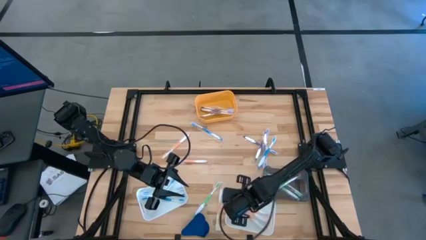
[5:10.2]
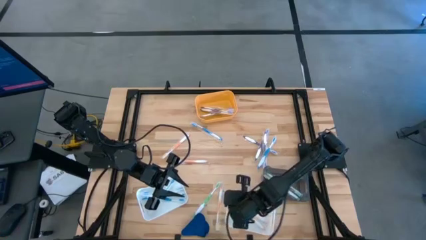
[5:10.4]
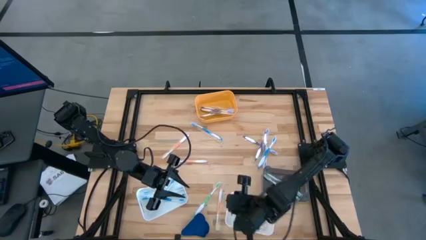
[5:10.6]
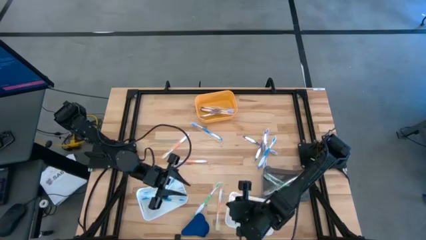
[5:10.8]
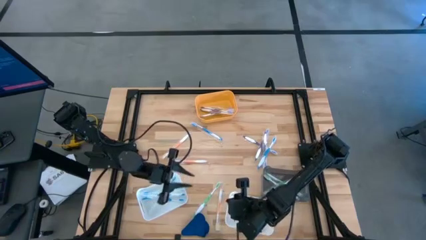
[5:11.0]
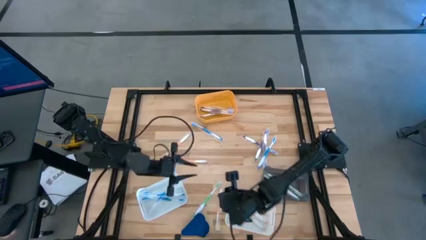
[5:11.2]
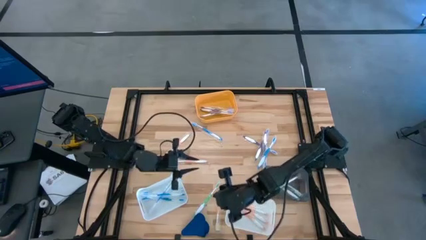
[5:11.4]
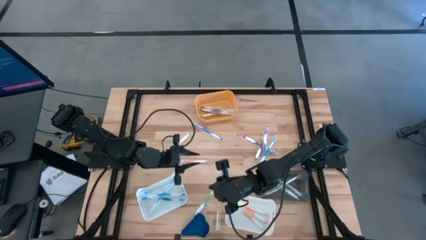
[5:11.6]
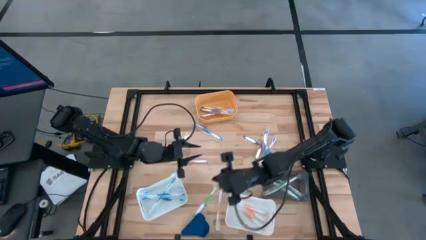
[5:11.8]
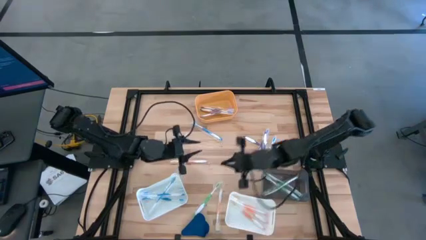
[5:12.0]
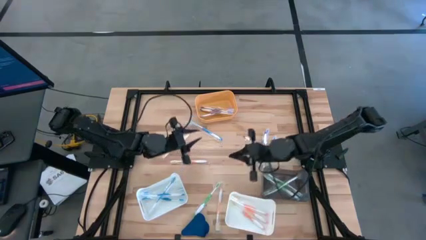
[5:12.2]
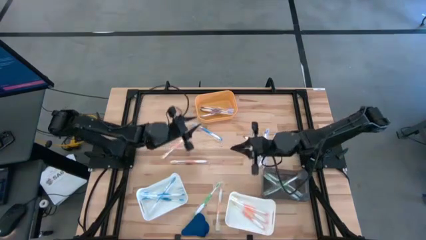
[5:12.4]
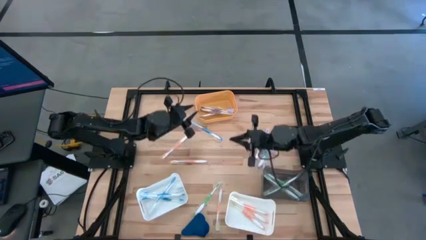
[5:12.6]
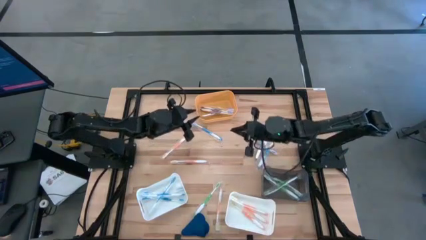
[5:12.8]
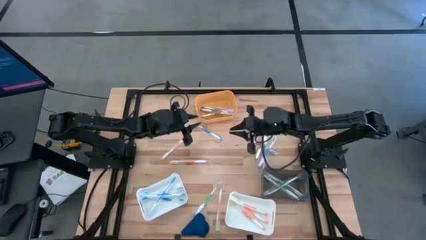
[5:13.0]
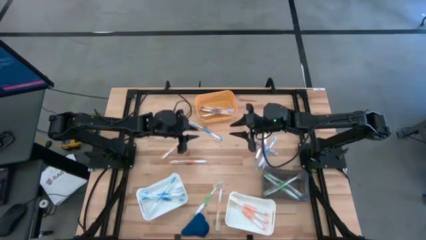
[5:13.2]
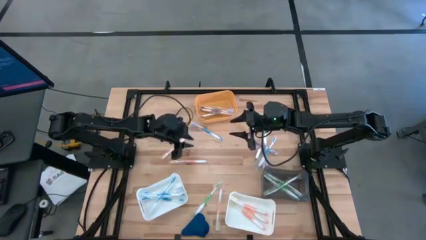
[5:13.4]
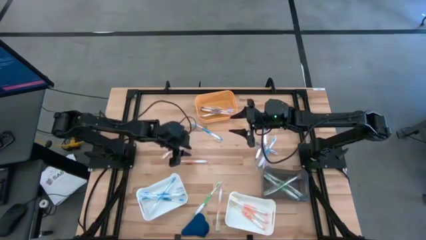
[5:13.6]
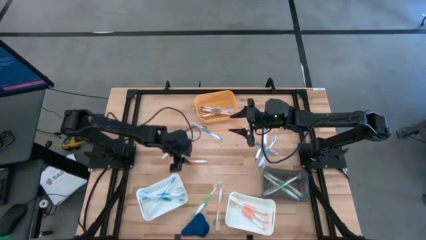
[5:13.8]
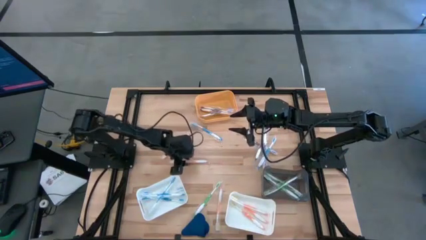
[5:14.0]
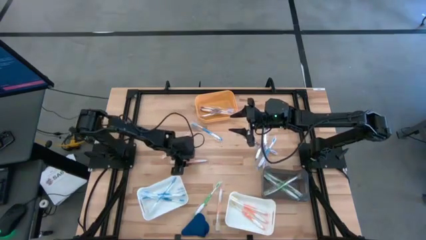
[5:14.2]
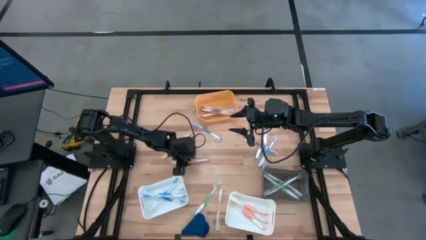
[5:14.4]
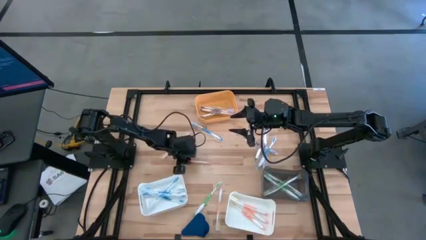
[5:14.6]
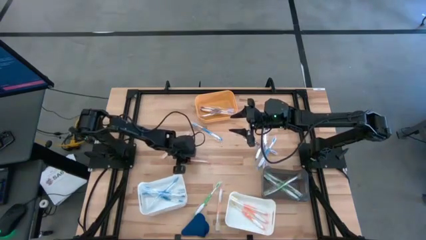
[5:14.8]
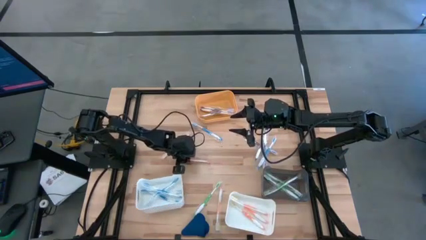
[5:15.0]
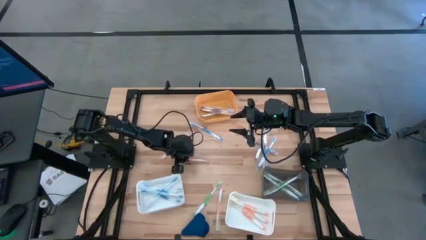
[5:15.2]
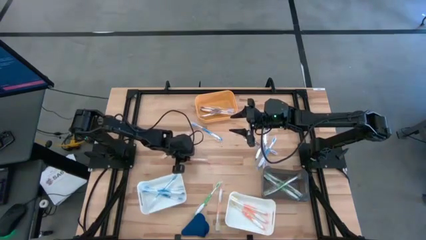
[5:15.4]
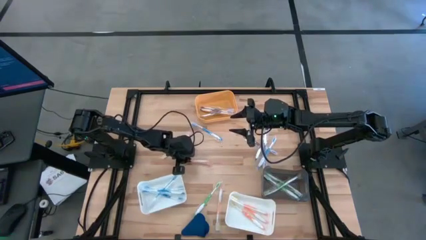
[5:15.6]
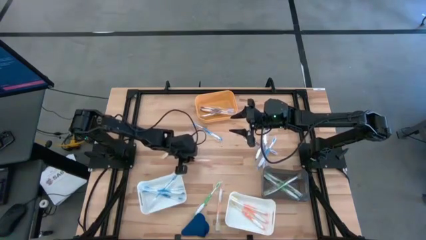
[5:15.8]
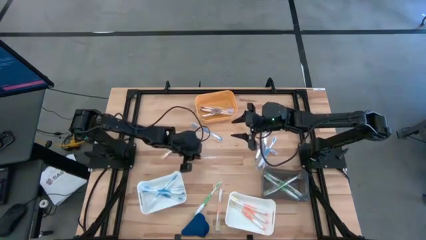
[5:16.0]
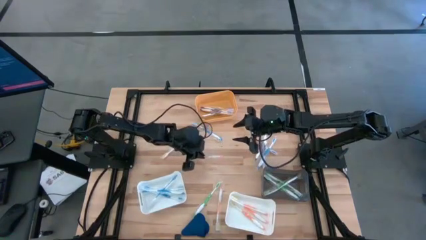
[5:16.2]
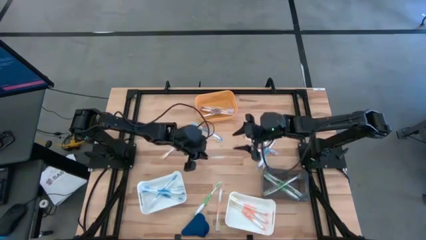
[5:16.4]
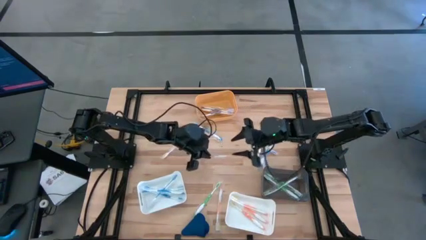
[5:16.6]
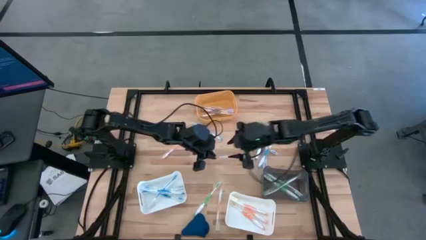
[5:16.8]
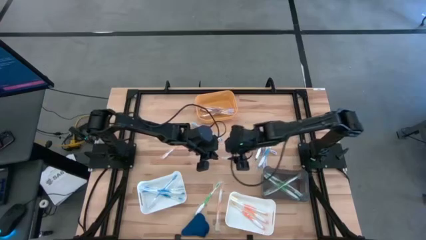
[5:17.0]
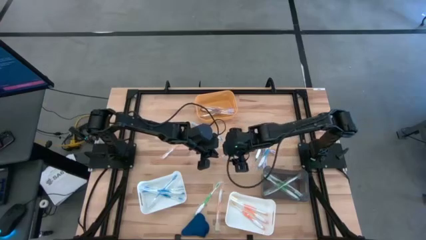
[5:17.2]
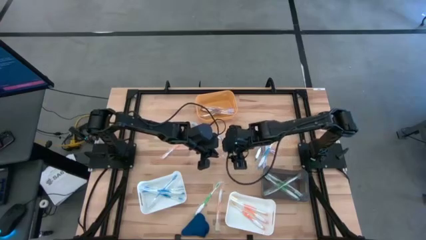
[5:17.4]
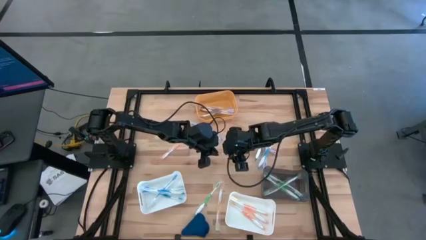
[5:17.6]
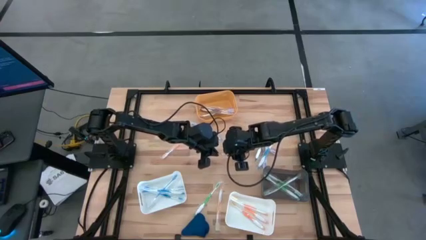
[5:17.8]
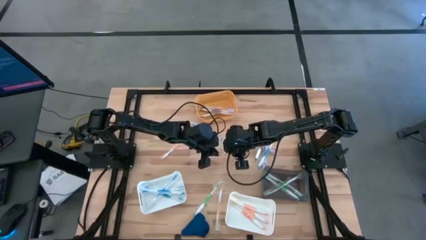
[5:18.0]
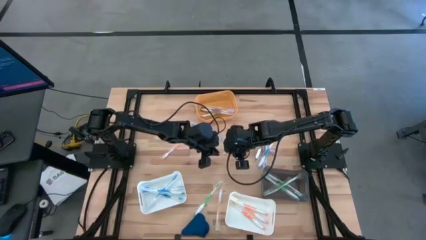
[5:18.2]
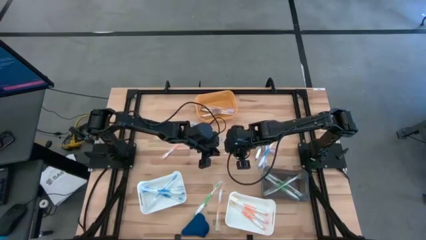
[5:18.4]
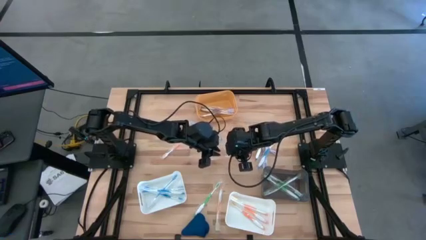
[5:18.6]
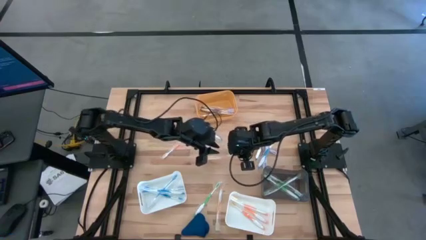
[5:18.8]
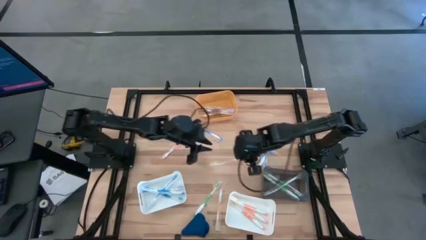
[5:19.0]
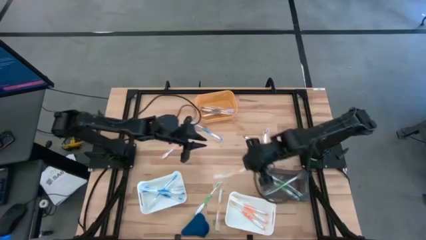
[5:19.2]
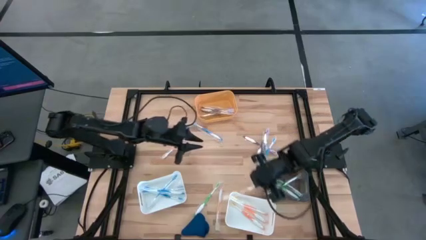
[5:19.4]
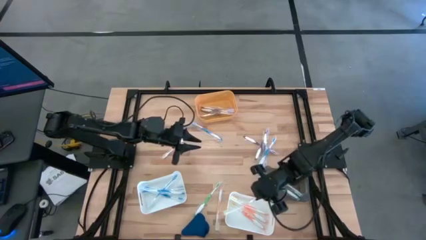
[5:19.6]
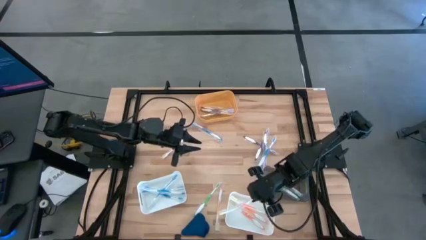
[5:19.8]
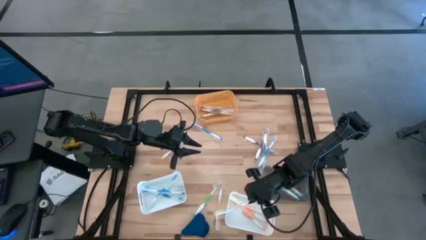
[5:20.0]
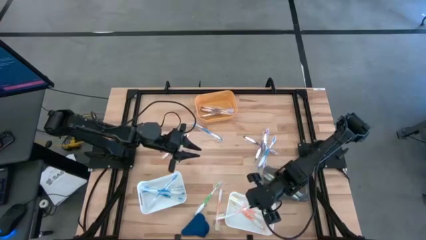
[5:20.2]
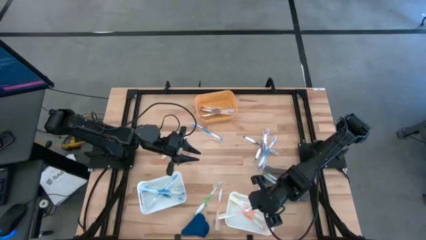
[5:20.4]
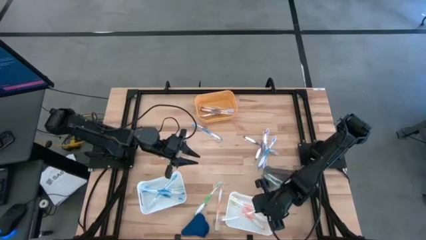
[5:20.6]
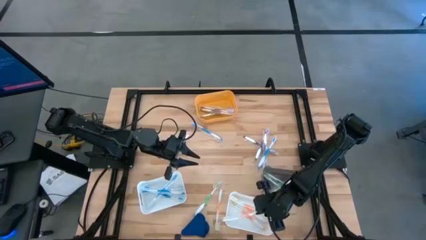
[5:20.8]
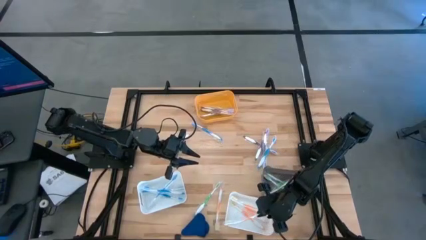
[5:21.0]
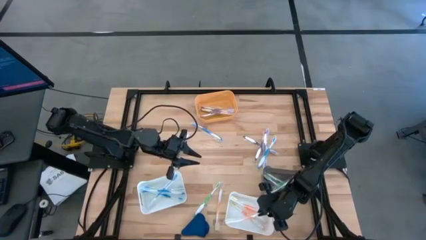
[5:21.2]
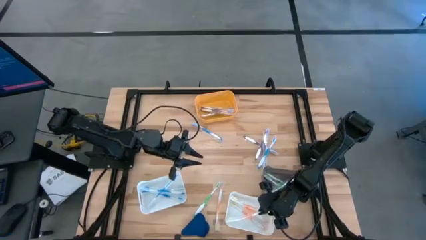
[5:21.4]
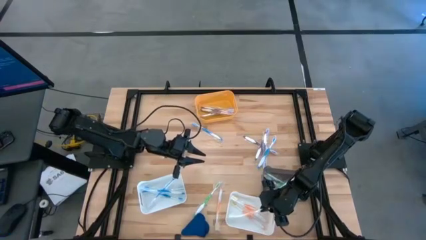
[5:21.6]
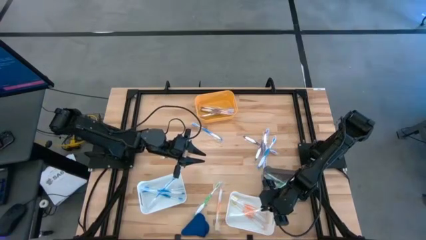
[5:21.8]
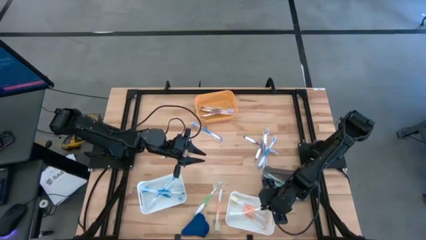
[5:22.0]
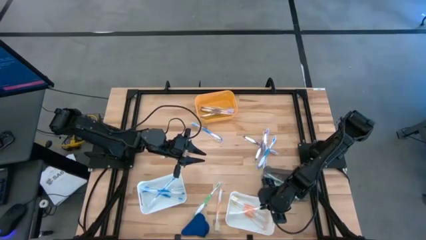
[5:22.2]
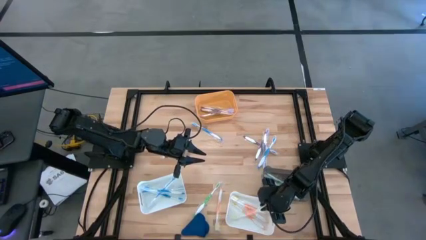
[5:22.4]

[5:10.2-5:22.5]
Task: Pick & Place Toothbrushes
Put the orange toothbrush into the right white bin

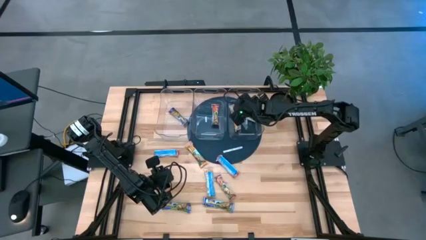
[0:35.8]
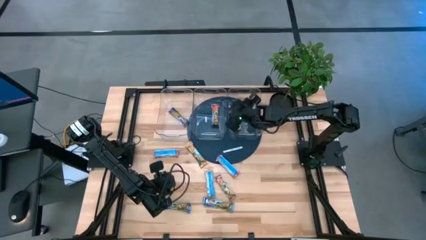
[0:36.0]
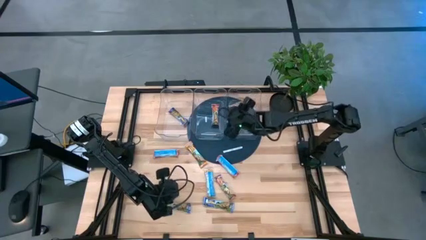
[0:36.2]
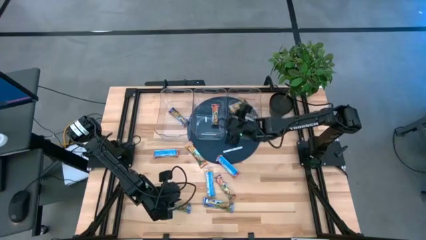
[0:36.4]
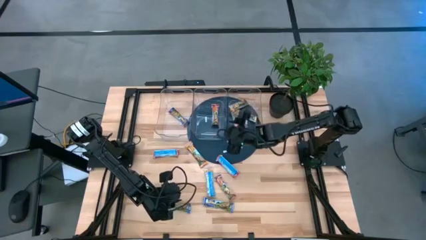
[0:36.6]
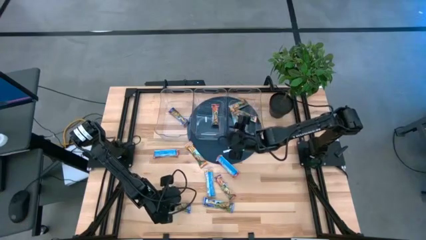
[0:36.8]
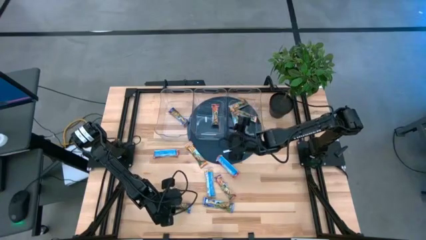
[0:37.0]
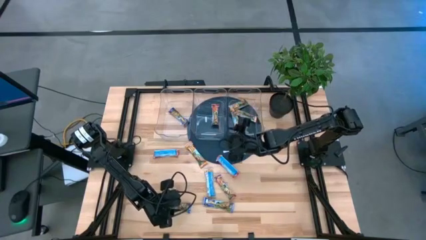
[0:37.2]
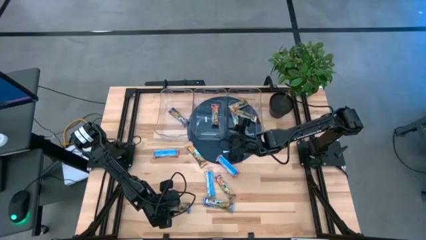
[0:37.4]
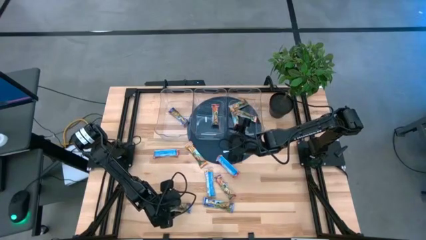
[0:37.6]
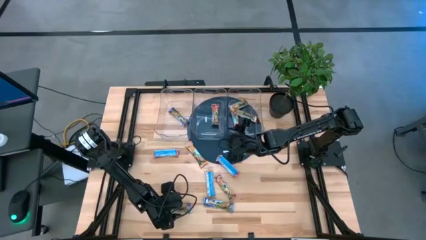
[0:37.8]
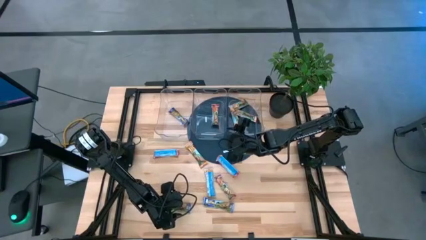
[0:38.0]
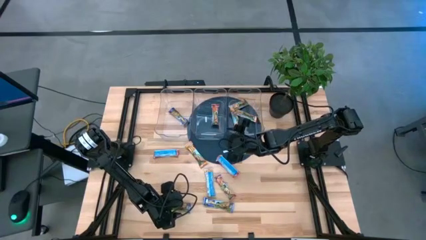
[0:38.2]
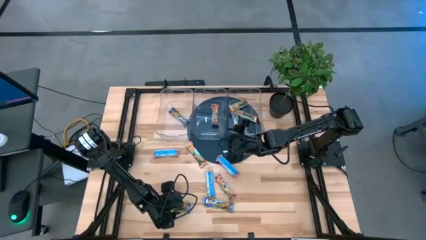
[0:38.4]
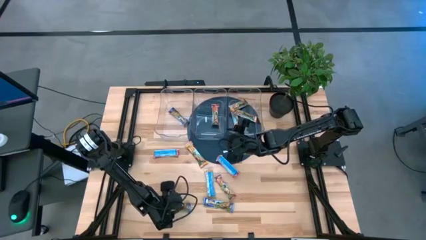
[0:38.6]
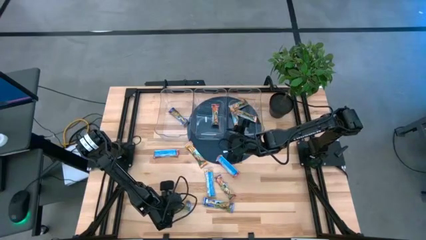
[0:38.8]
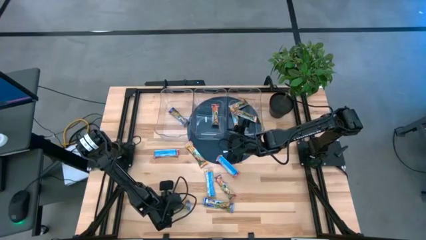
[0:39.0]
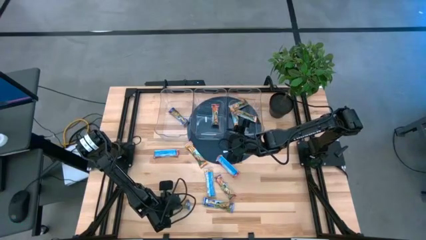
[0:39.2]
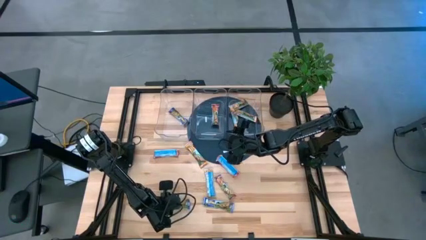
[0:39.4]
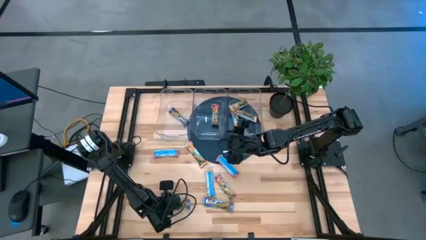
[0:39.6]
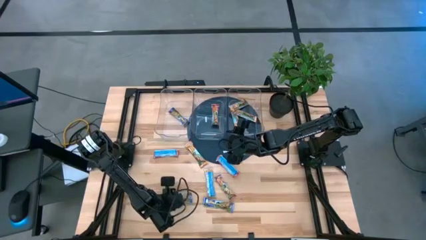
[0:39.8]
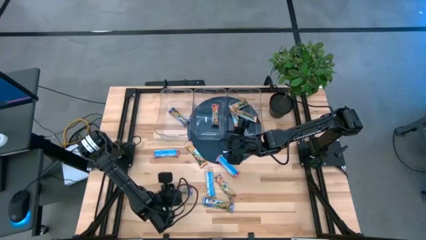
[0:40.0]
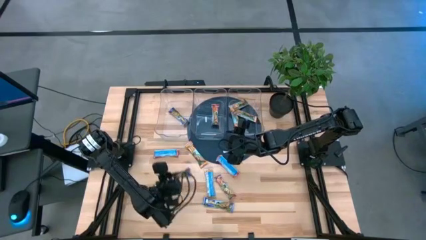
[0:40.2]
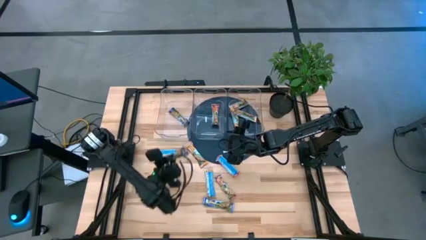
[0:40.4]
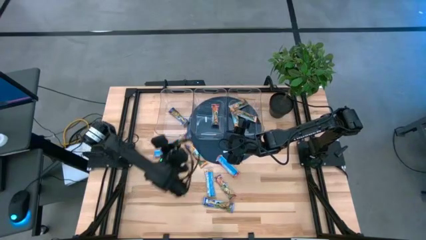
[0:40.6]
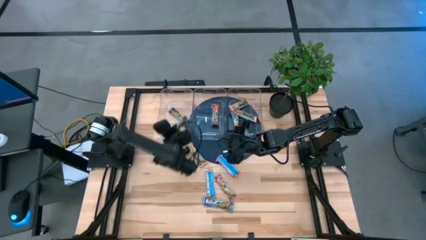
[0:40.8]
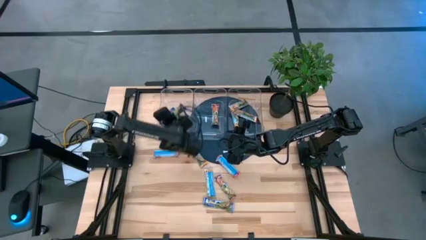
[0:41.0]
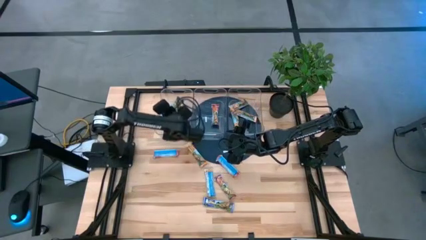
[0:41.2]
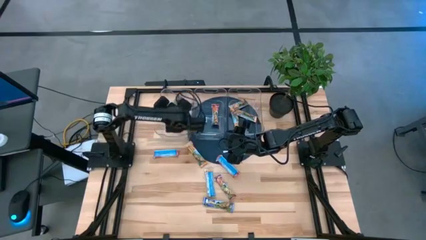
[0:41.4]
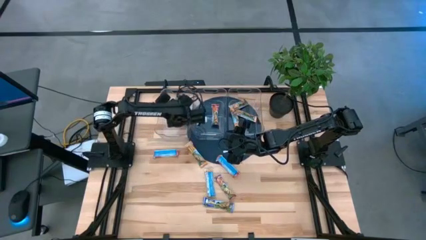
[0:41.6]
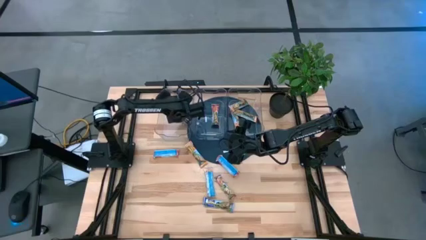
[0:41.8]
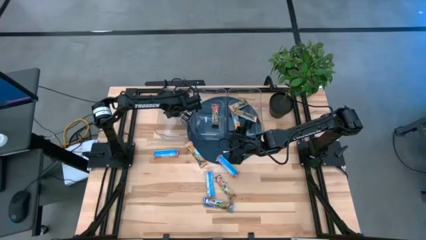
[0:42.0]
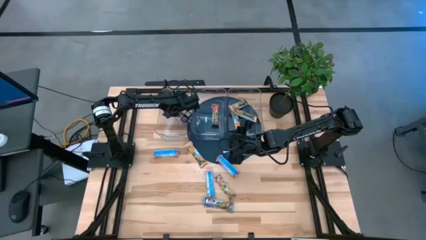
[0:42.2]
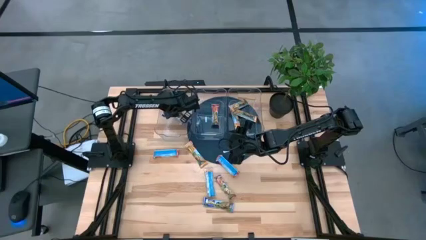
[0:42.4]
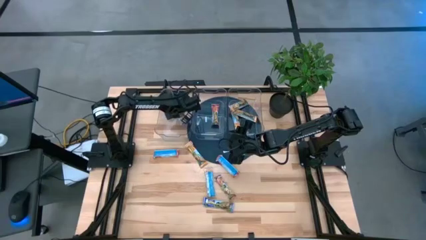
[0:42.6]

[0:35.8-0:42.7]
Task: Pick and place Granola Bars by type
Put the blue granola bar into the left transparent bin
